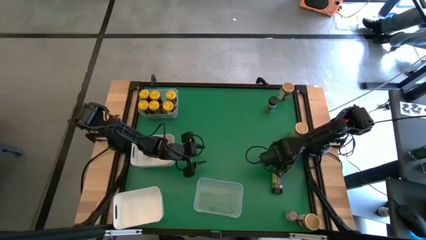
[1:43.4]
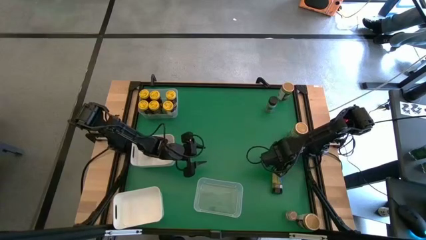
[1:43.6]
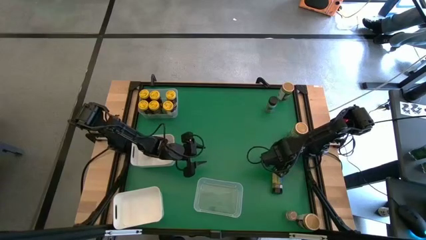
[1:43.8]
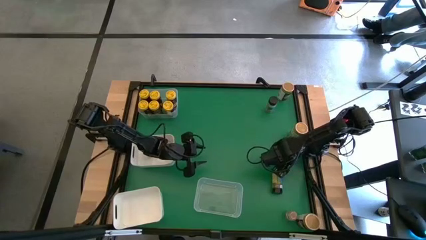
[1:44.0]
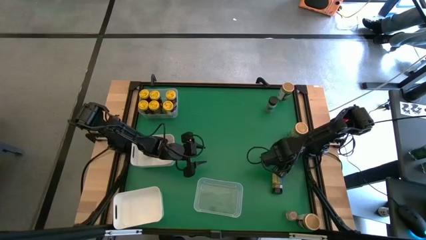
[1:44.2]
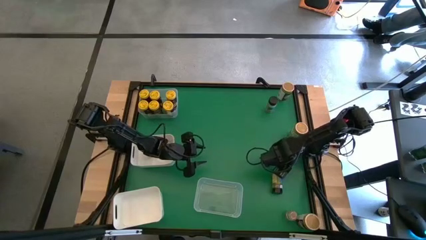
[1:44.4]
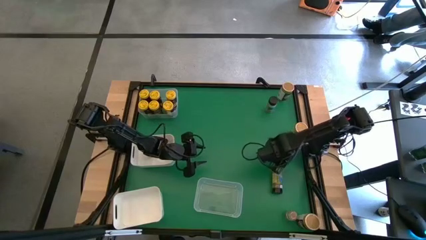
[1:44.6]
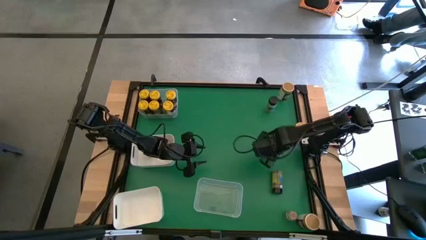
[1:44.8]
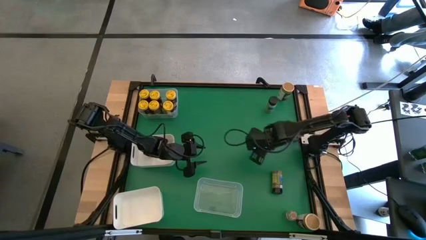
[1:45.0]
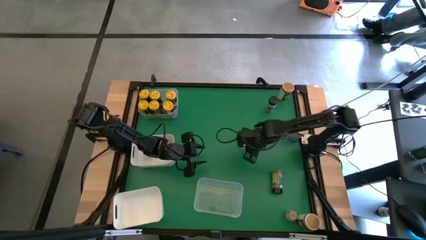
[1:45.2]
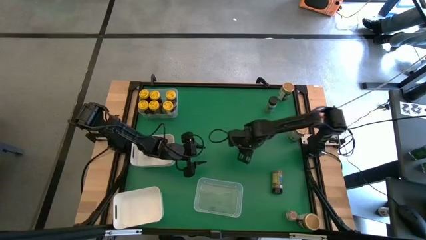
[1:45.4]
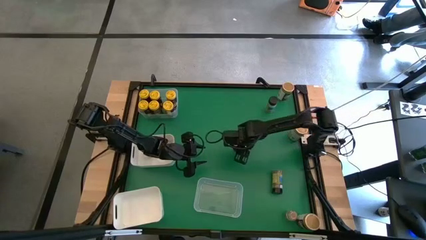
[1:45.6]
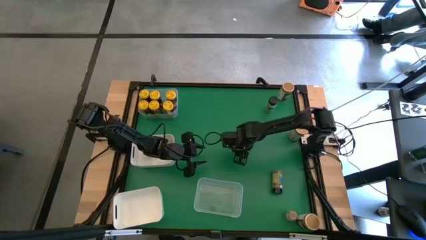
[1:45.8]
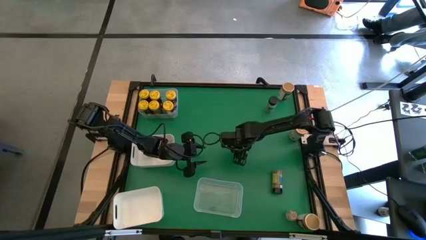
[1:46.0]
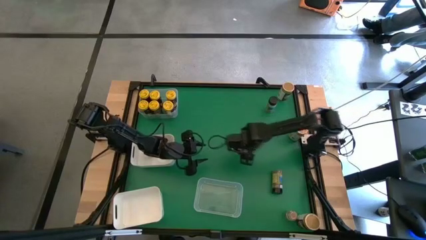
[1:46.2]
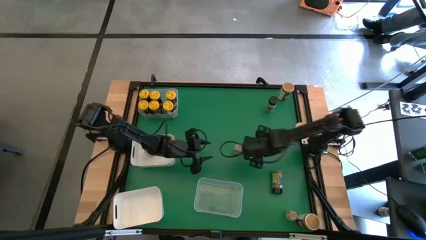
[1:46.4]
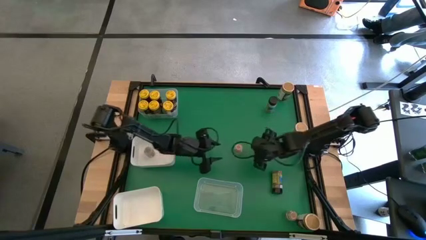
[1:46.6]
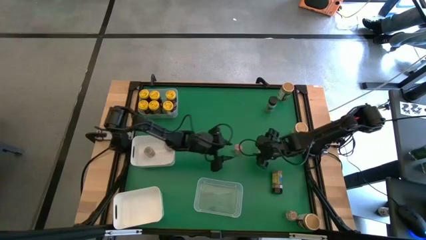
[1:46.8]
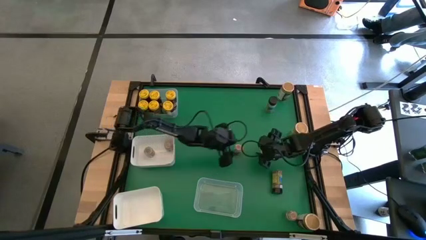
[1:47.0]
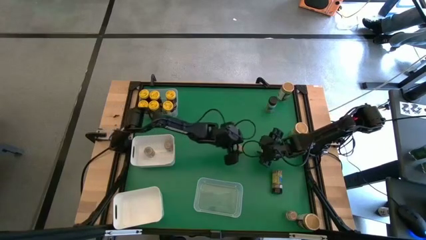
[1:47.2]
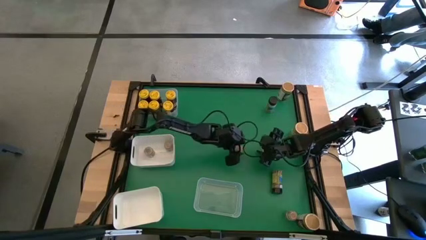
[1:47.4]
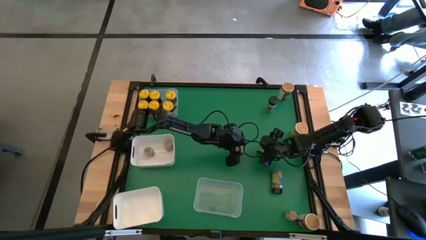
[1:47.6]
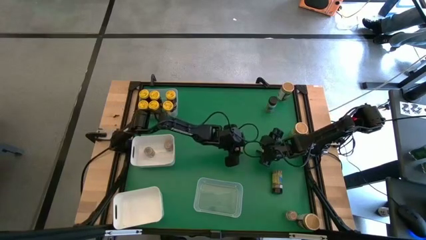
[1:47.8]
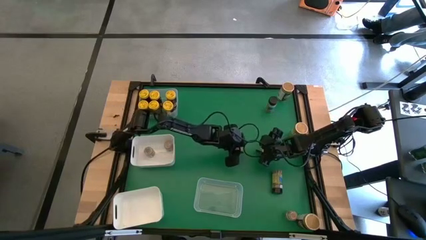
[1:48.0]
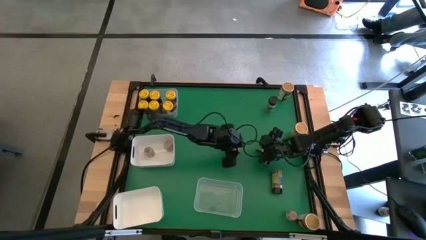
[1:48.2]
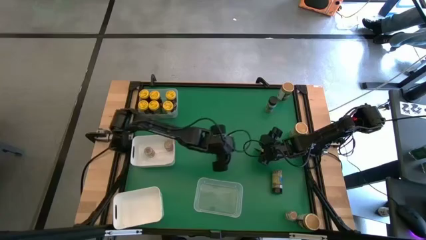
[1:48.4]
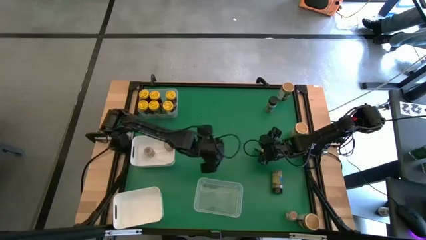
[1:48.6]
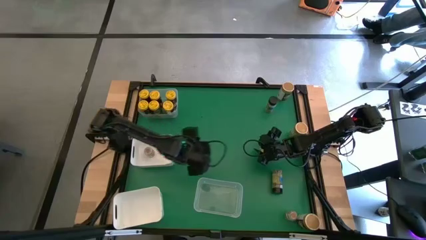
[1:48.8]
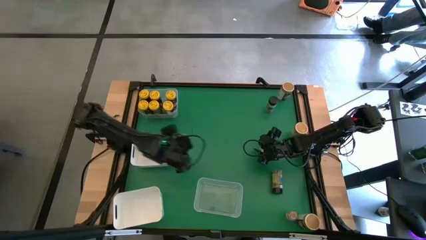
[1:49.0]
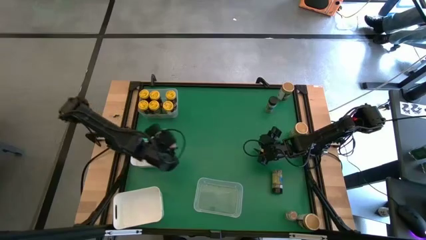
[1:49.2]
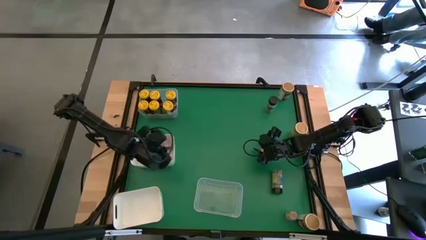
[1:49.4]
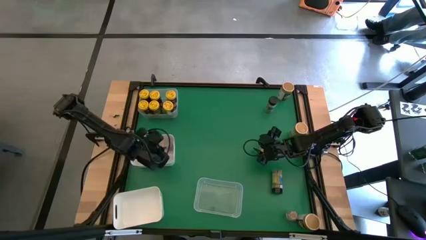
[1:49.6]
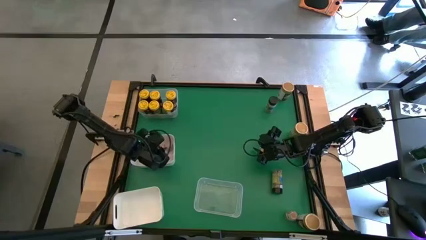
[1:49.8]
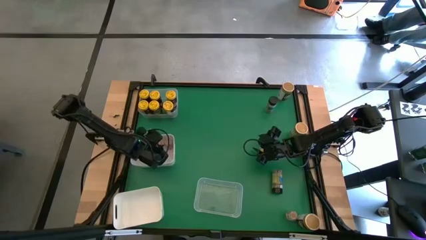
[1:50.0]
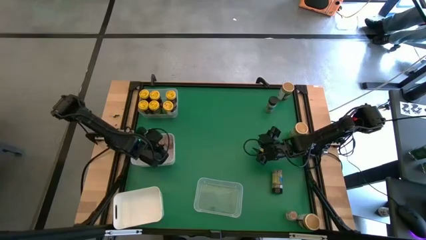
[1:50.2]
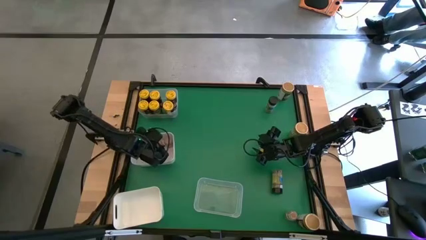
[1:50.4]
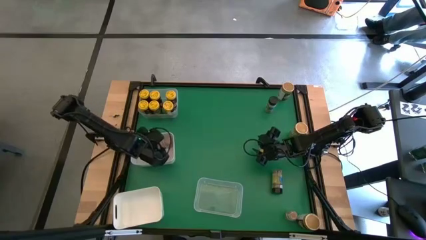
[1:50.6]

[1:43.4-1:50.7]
Task: Sort spices by type
Put the brown spice bottle into the top white bin

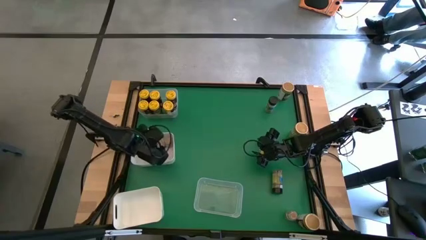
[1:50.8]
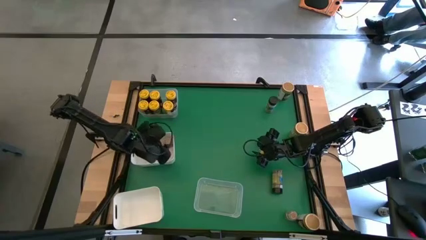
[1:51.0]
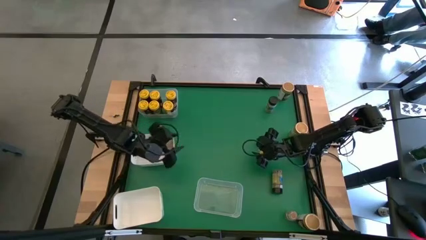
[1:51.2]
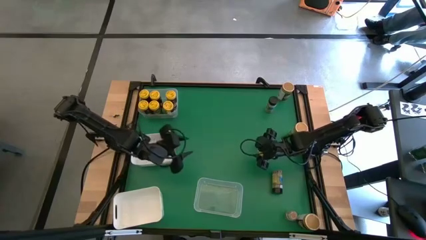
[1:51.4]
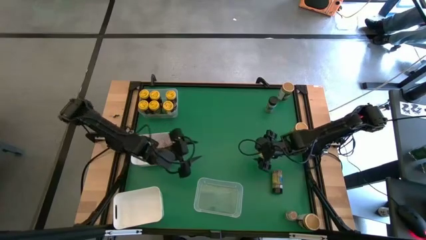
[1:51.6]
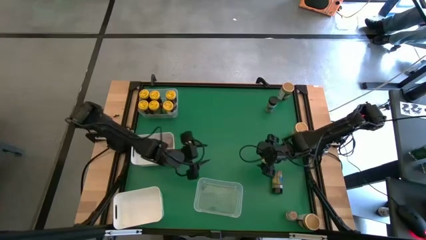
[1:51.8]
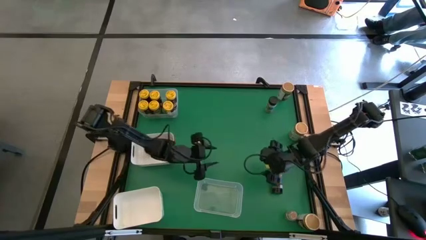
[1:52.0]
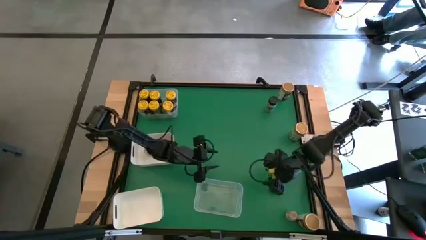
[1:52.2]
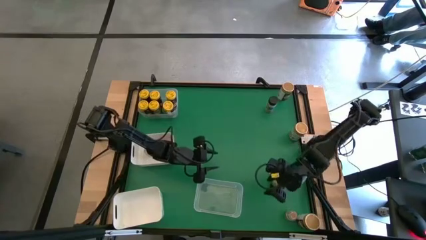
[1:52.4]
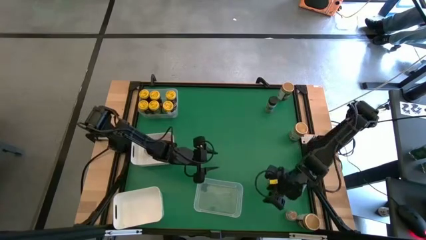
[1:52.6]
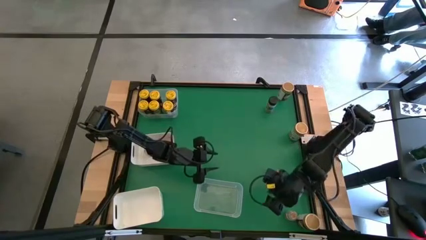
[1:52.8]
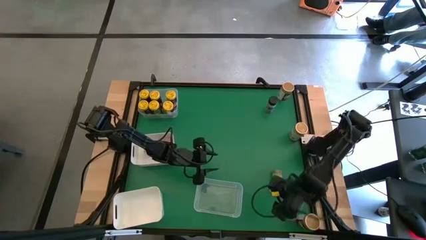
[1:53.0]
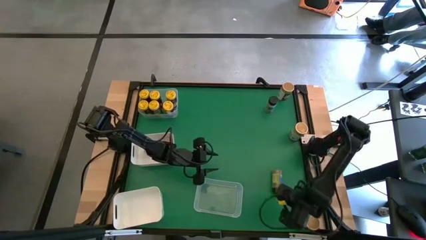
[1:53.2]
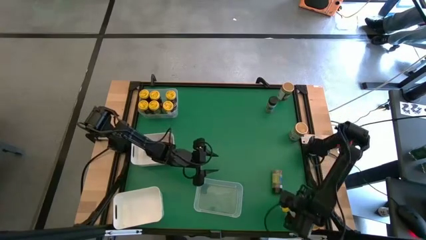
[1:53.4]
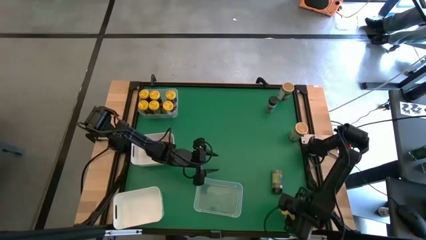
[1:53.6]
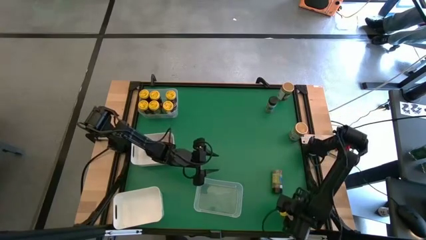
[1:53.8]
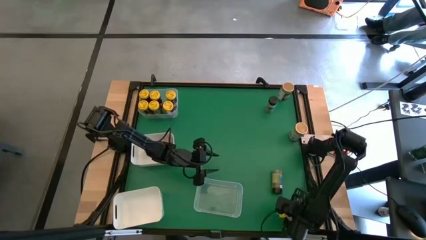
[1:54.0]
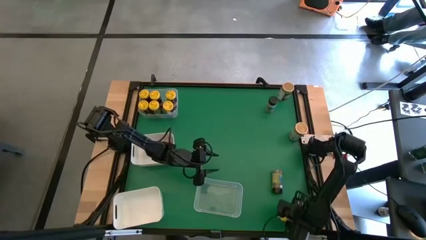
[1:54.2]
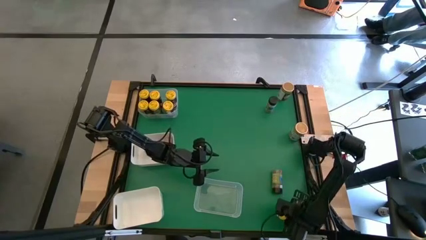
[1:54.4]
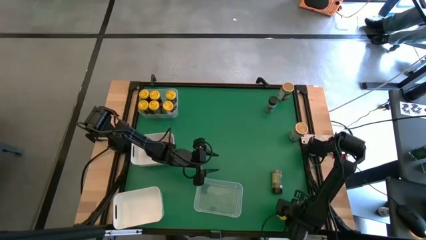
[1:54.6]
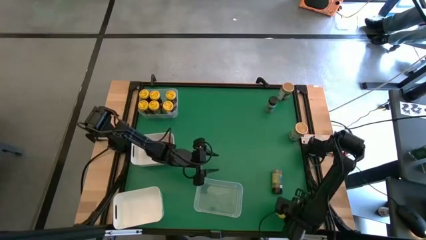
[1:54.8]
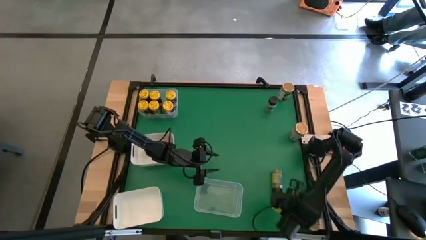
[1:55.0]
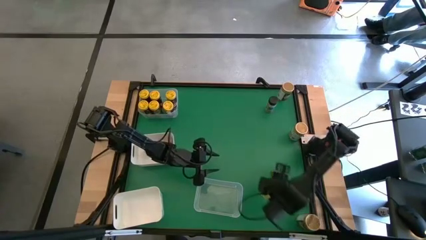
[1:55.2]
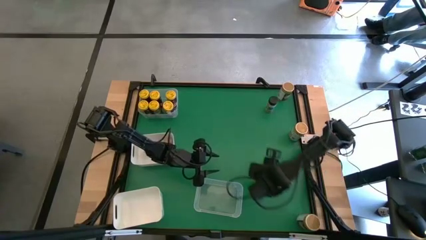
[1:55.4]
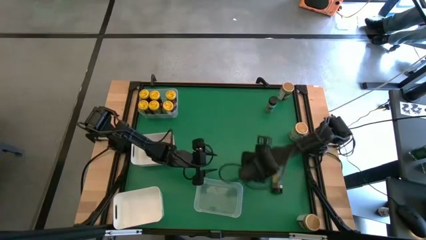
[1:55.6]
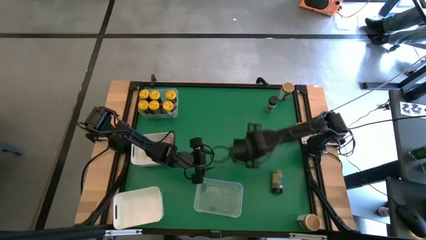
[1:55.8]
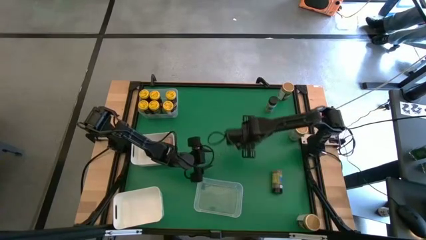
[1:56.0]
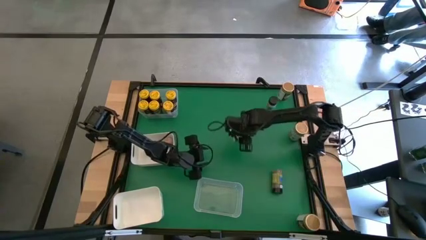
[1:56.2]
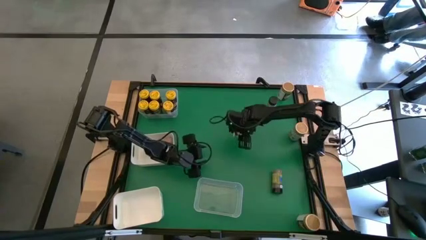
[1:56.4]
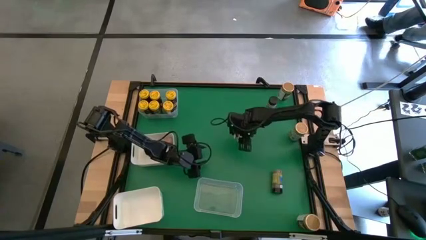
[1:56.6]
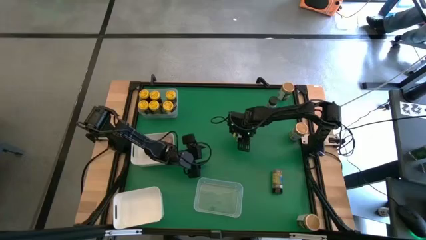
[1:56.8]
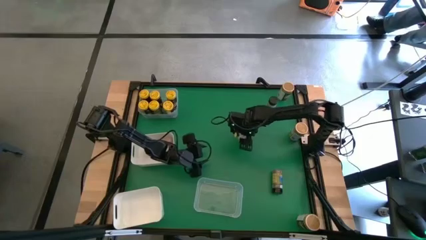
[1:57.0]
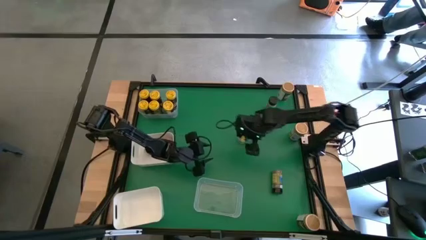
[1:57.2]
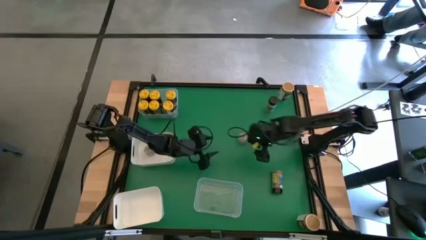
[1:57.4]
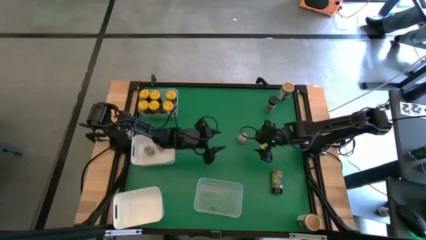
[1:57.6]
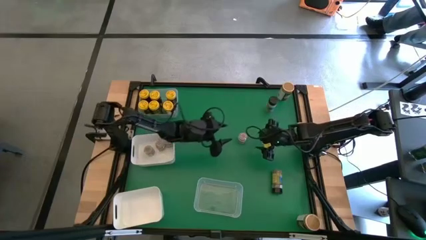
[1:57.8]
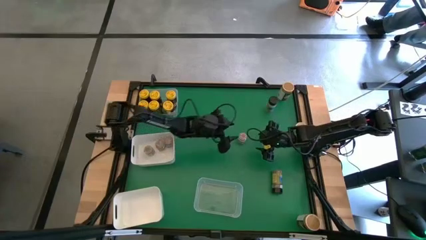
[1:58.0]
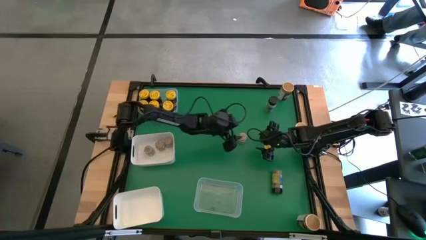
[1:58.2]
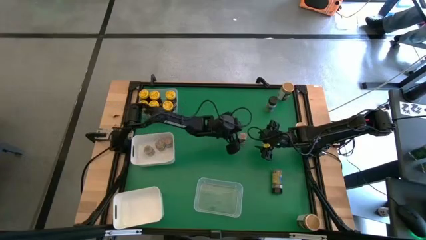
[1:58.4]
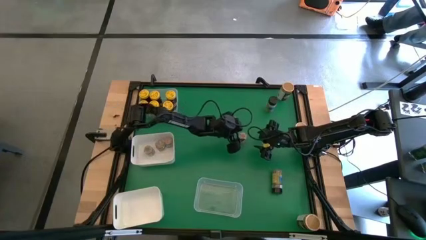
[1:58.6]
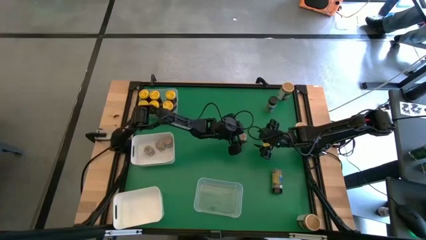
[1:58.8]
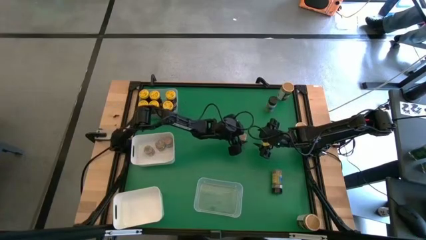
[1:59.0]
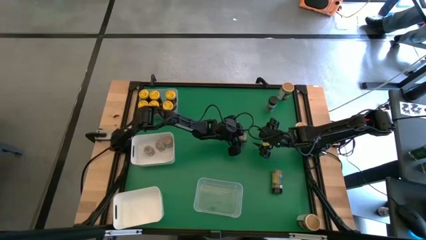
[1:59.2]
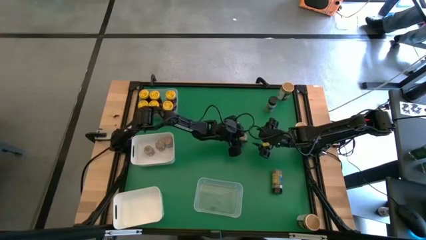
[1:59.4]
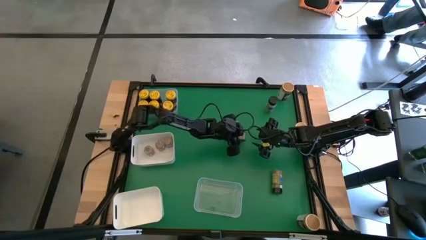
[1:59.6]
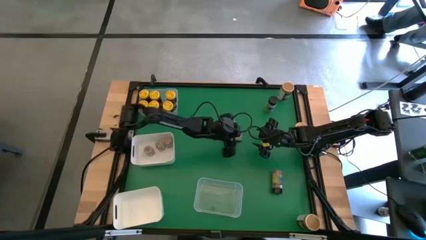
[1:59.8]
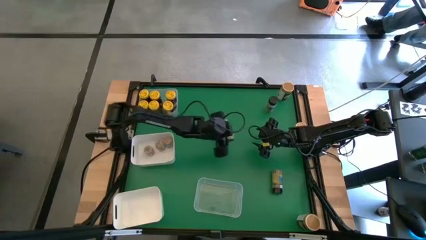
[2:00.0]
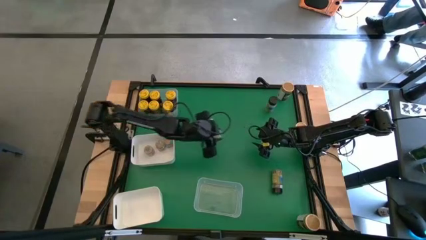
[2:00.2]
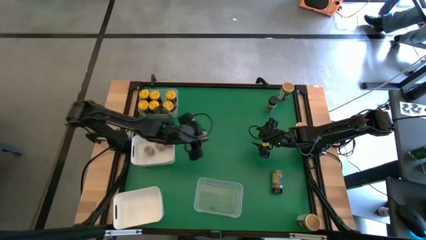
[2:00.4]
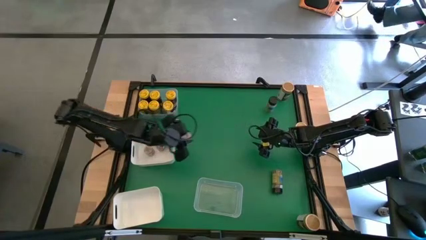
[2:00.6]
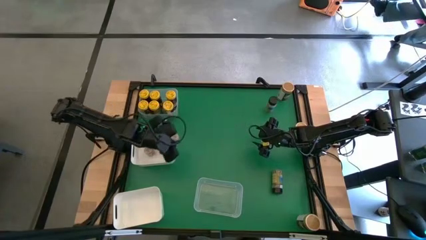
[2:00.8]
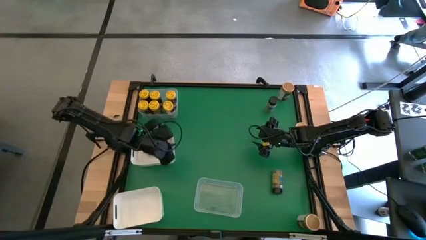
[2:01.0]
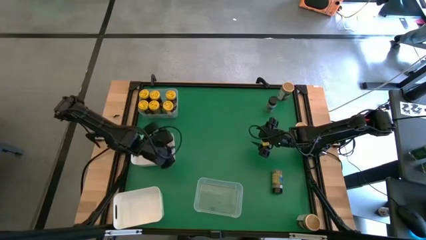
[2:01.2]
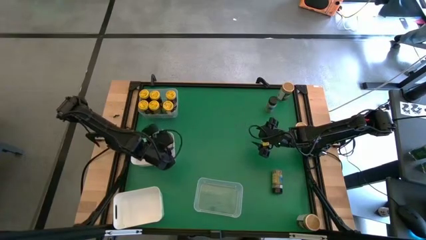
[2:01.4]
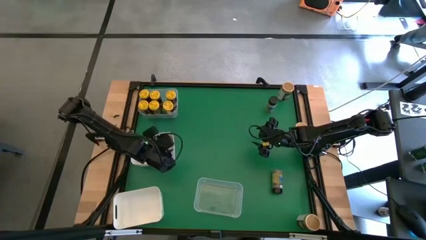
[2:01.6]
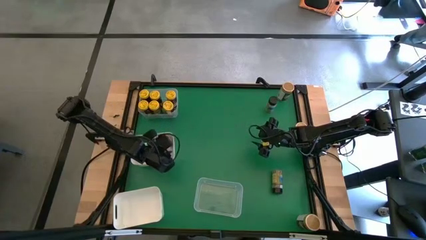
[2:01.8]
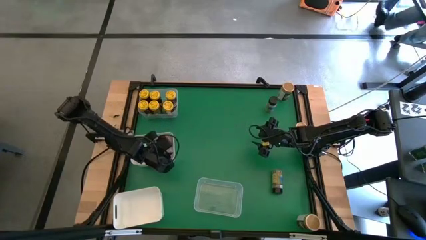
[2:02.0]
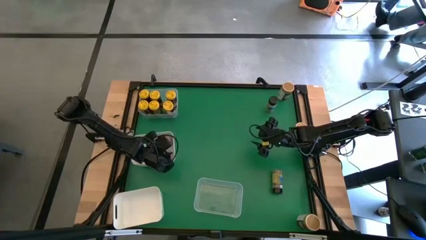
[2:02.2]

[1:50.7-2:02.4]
Put the brown spice bottle into the top white bin
